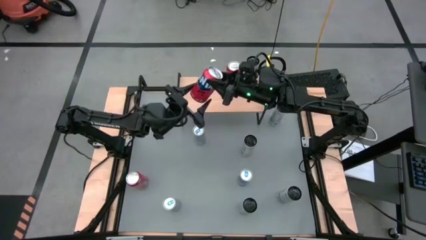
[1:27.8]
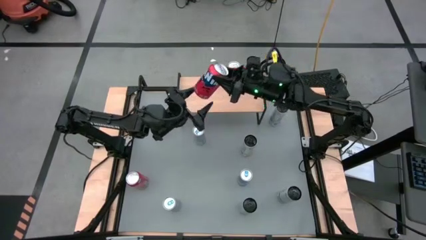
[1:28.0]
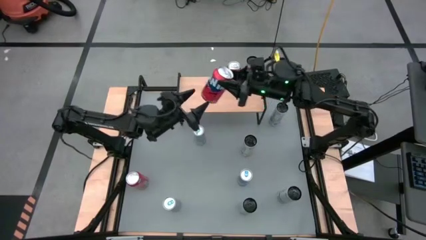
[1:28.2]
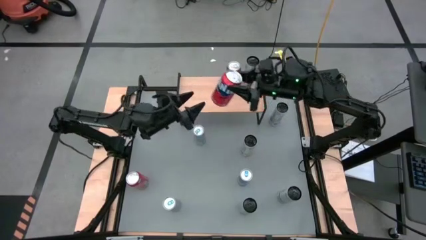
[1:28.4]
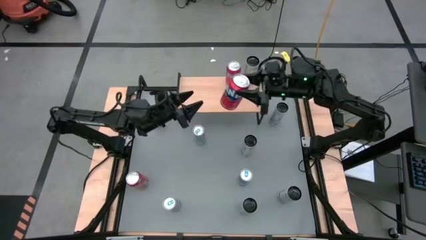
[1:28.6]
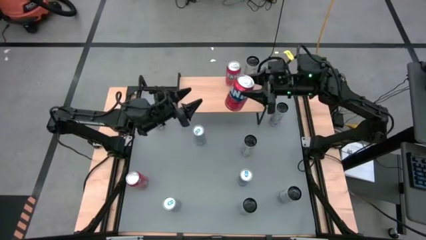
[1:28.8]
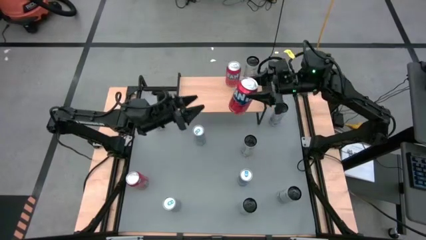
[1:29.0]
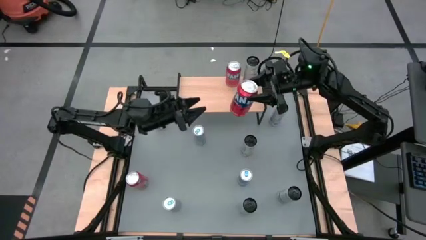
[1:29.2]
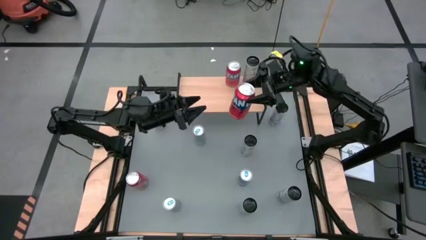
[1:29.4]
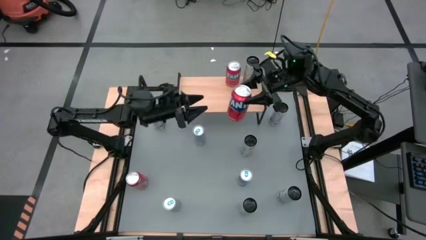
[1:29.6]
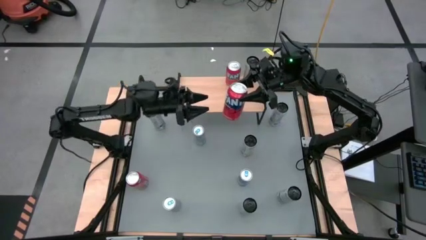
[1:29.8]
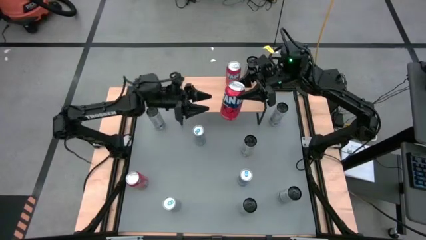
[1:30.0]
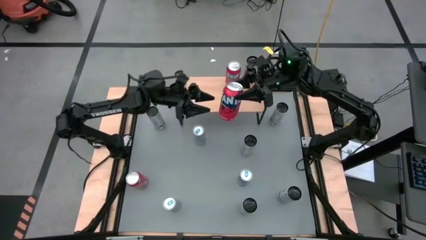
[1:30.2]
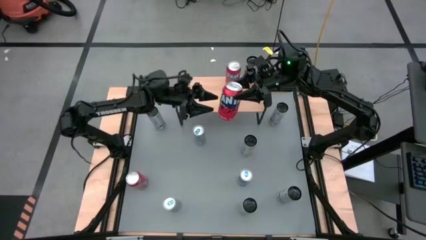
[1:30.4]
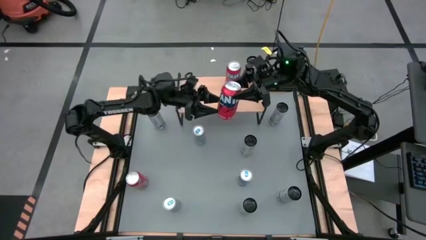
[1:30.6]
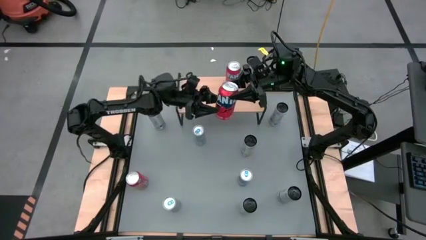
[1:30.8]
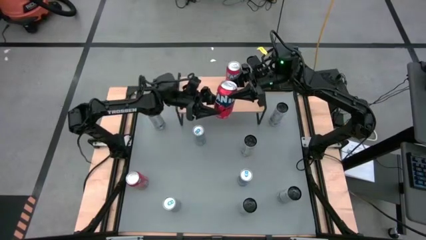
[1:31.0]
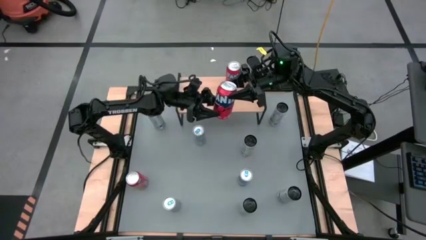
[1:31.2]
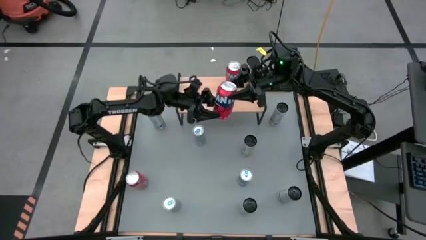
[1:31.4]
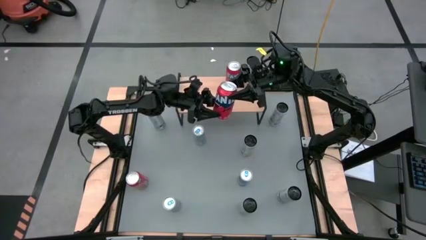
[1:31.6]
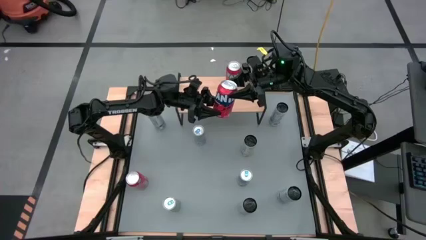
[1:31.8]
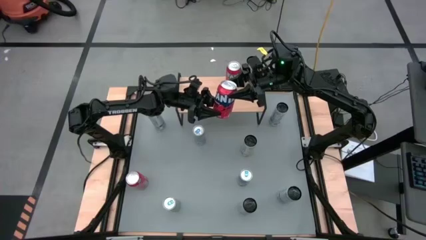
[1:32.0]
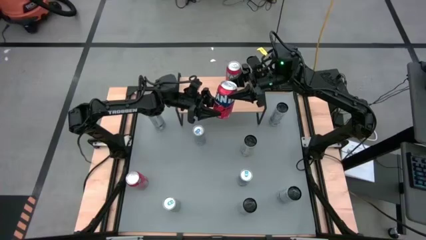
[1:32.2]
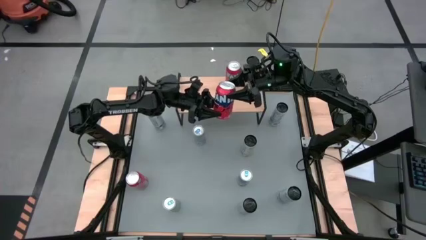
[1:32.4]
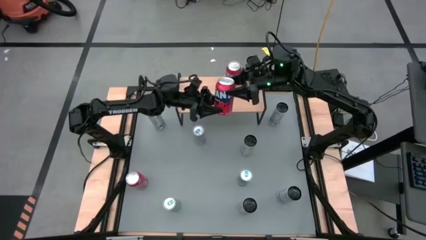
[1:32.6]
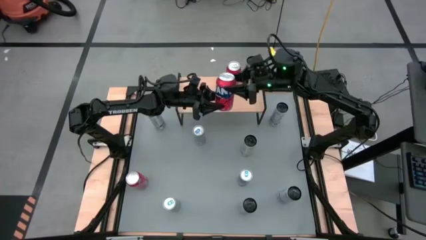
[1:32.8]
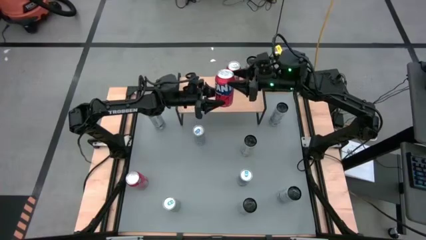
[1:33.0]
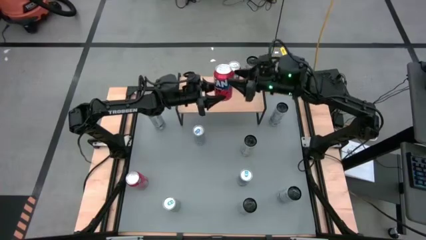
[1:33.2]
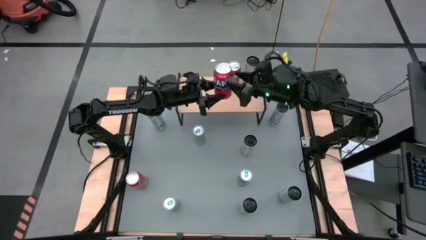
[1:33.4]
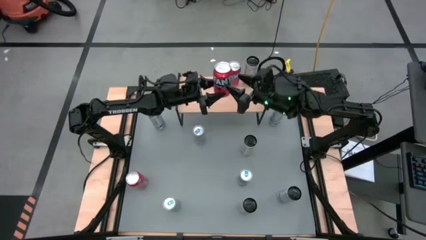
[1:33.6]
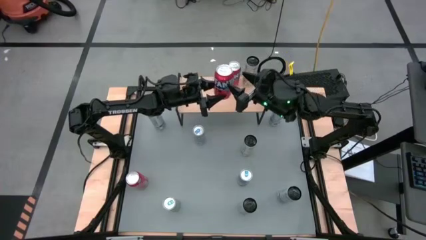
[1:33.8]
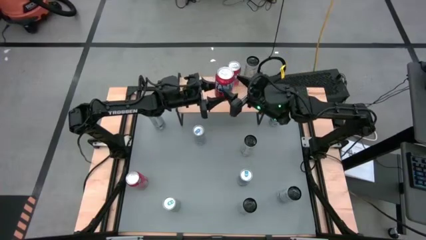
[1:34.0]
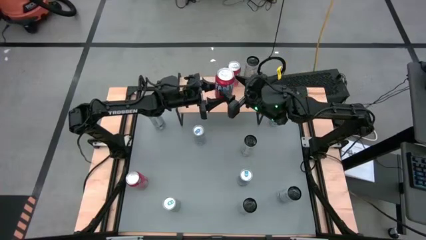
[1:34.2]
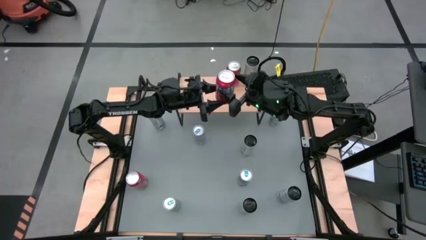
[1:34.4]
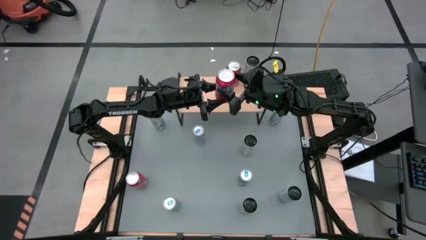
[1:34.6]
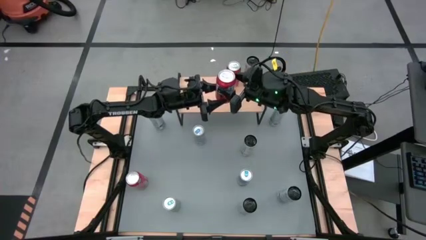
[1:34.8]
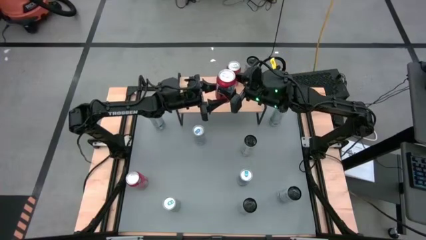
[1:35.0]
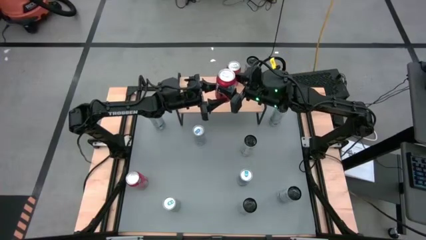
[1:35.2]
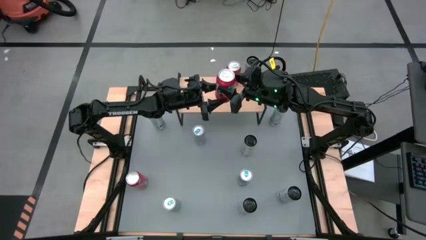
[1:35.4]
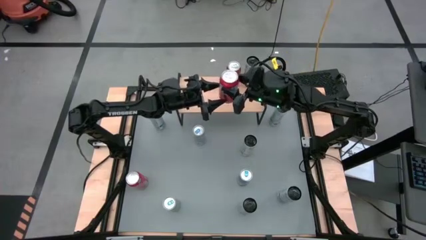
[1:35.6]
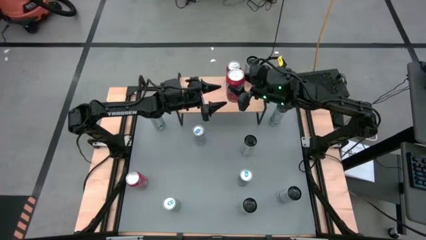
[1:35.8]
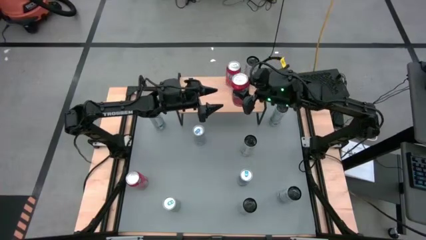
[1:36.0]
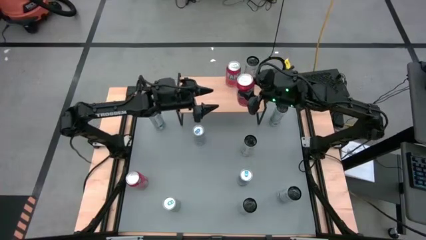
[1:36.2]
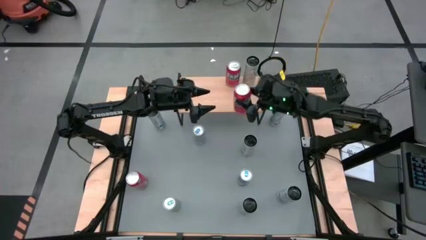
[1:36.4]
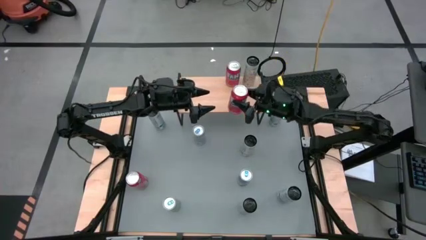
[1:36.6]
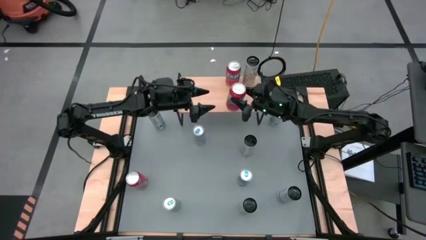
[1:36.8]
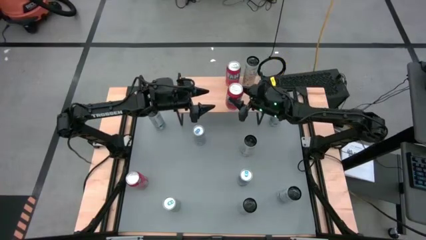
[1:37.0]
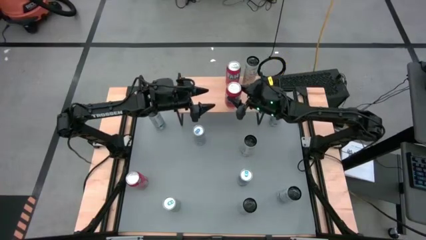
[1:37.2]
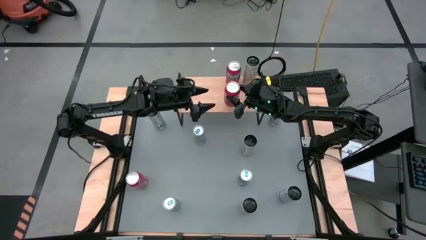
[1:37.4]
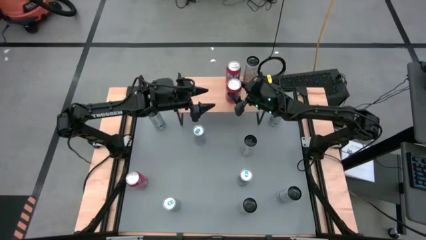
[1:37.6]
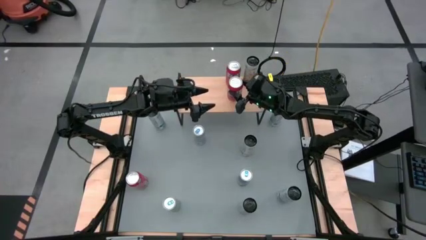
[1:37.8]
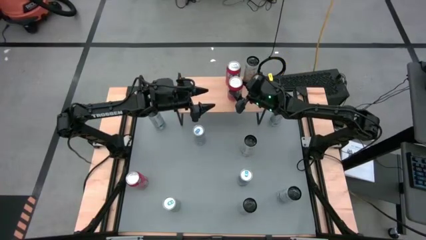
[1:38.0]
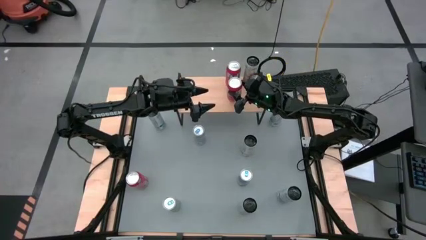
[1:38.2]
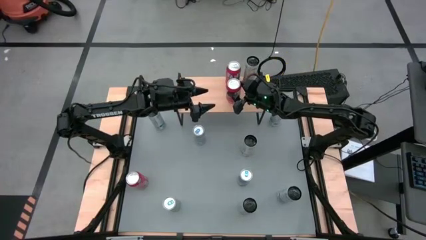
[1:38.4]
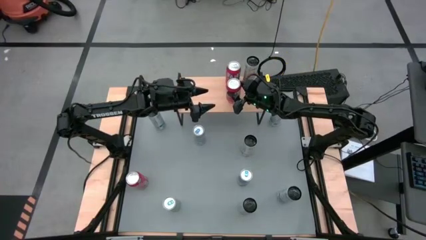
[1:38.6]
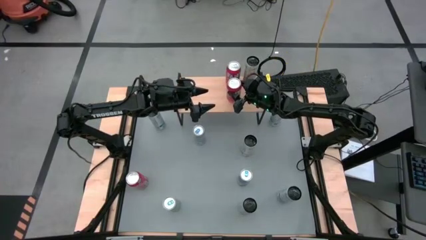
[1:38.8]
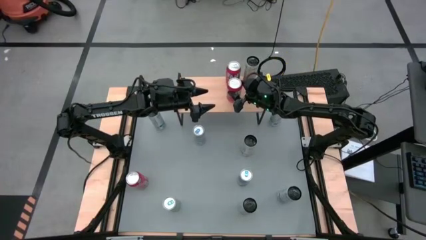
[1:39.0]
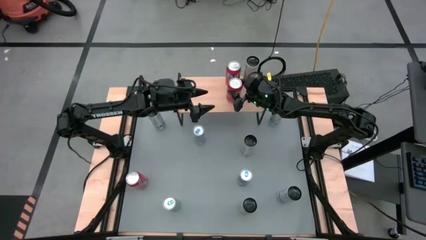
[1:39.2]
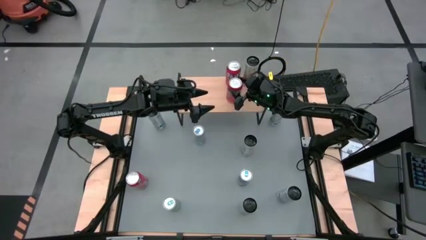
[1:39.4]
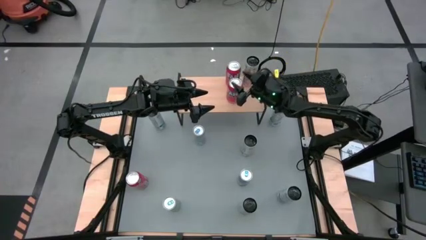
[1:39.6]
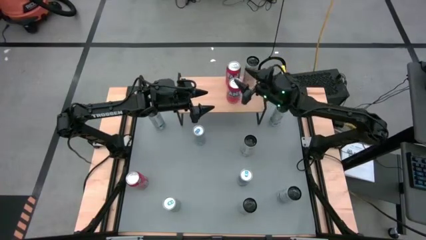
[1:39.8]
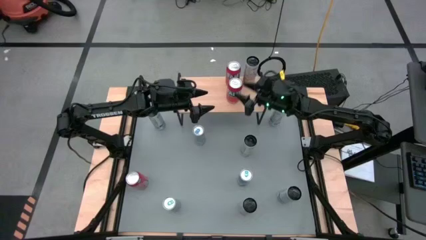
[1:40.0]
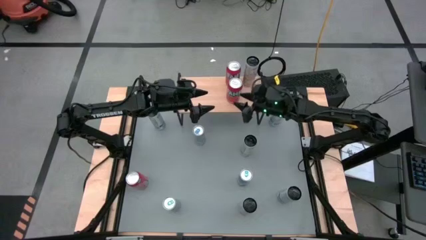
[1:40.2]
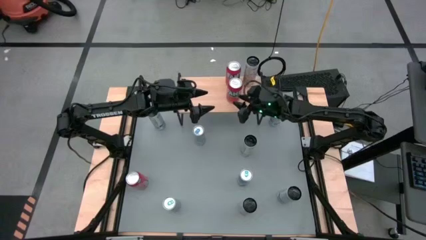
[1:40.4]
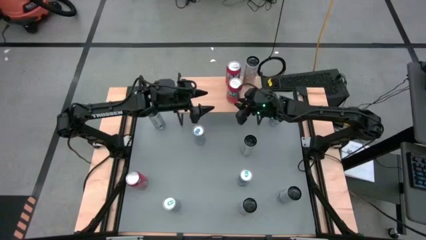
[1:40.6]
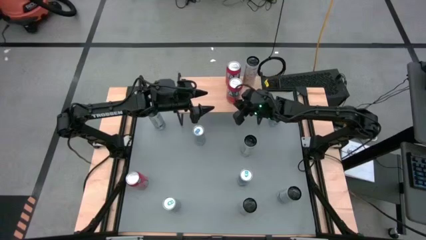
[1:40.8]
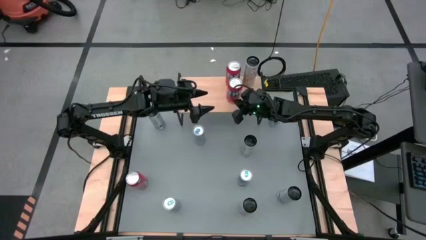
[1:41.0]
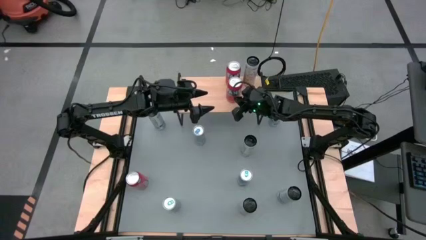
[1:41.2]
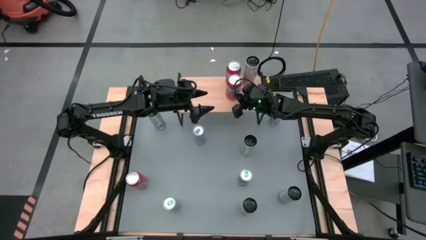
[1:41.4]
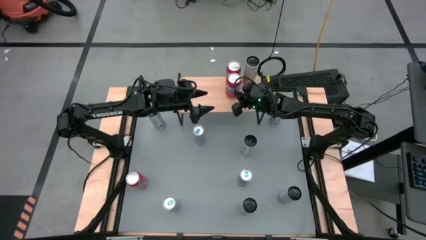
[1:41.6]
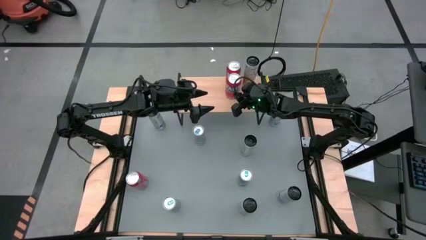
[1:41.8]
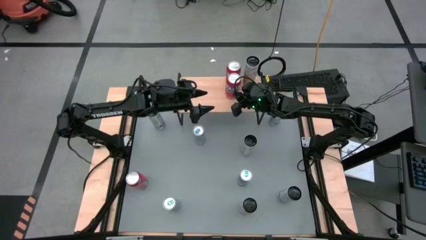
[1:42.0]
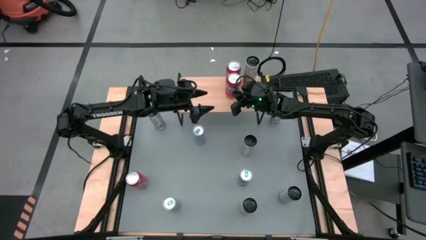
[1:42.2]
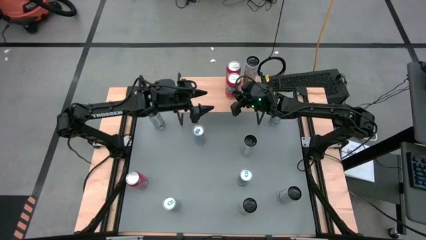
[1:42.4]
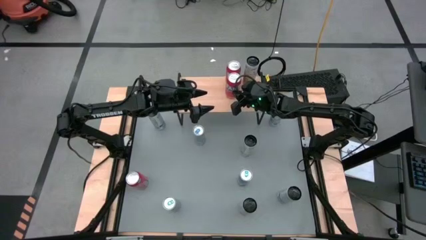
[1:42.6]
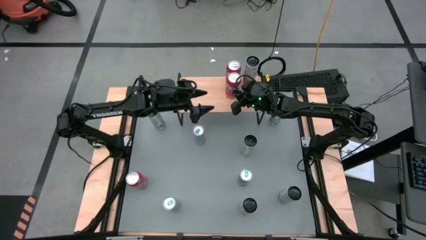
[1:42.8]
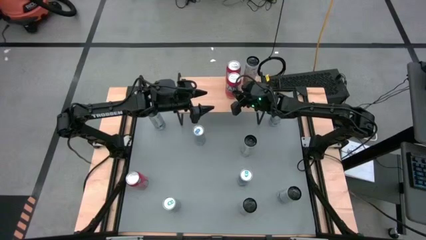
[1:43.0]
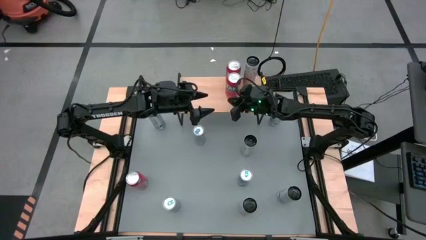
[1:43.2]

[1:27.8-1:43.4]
Task: Place canned beverage on shelf
Put the right orange soda can on the shelf aligned with the other orange soda can

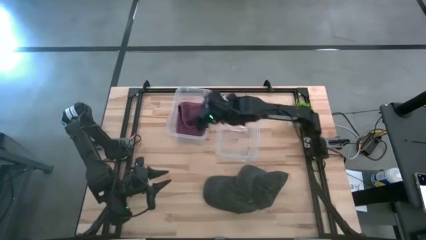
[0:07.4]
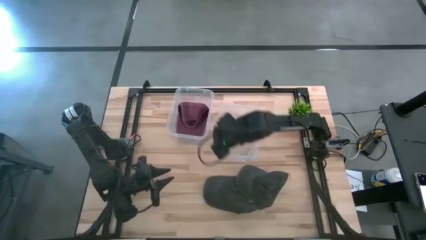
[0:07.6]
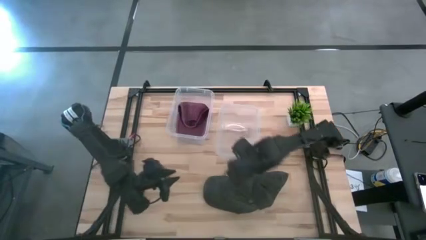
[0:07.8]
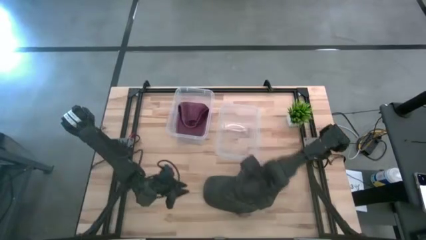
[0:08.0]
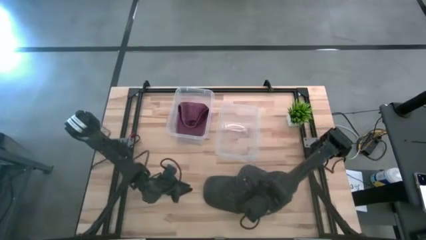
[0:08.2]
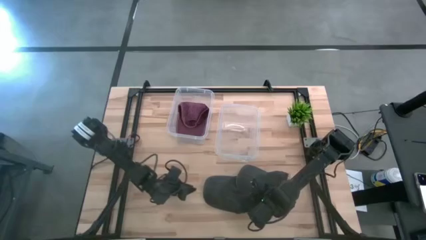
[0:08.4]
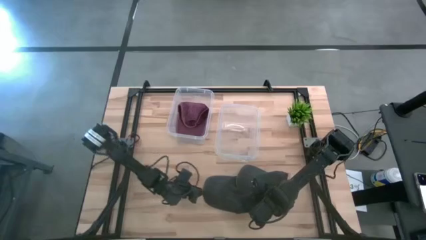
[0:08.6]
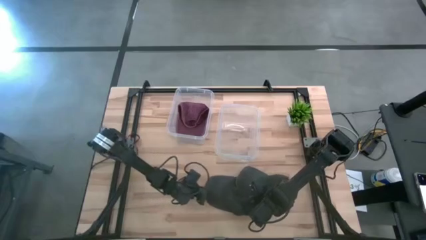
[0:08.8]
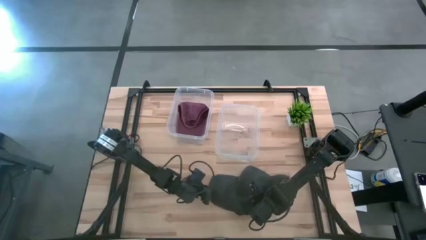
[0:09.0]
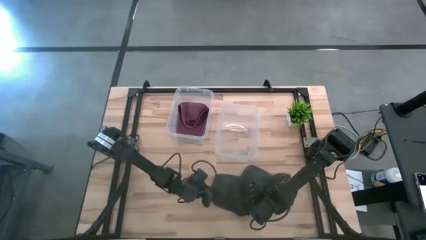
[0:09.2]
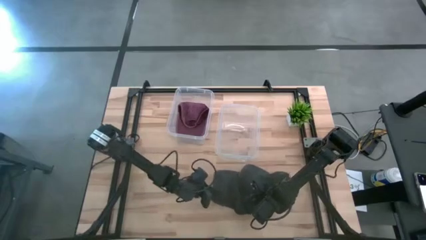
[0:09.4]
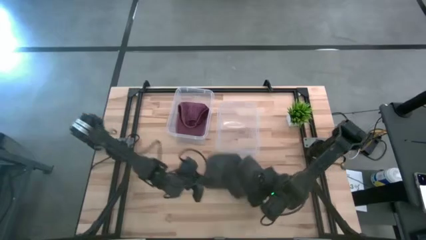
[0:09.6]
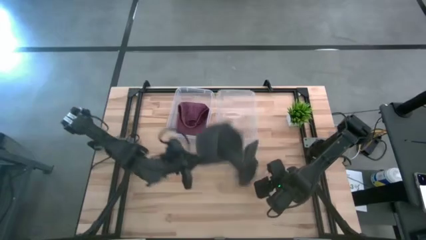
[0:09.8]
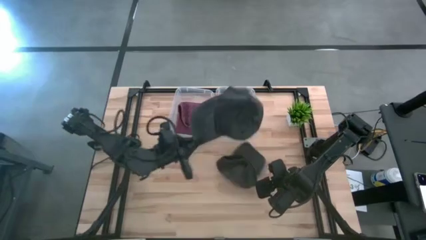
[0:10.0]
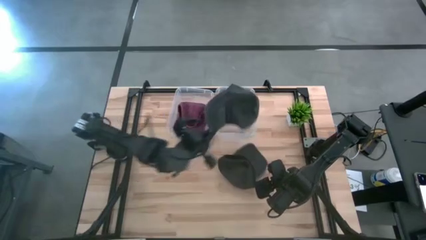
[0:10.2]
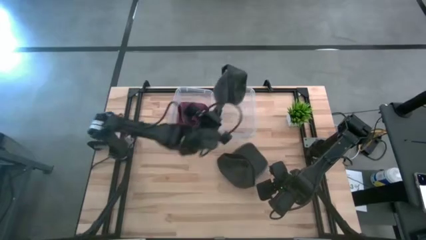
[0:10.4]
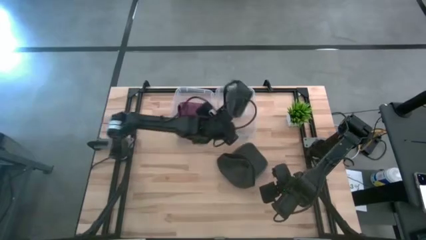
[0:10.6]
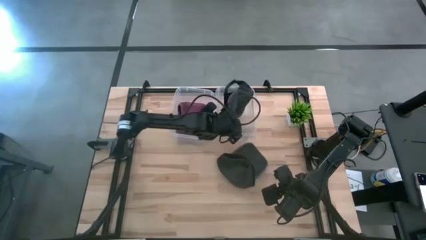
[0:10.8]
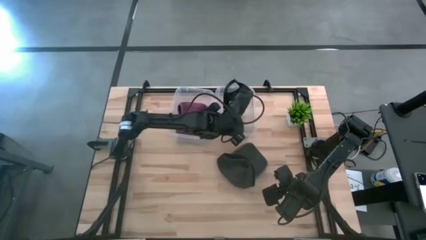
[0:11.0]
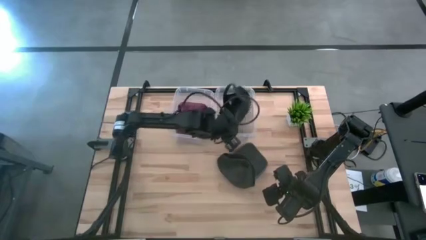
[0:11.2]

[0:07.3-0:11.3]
Task: Pick & Place hat
Put the left black cap into the right transparent bin
